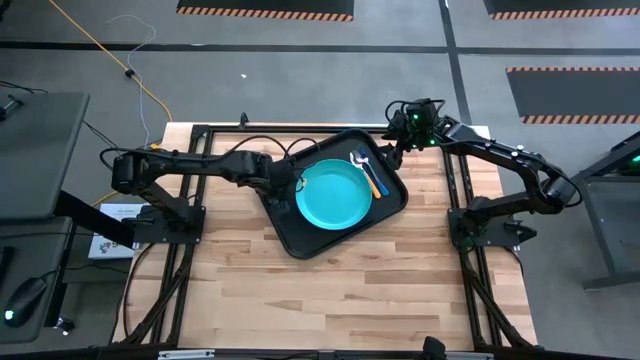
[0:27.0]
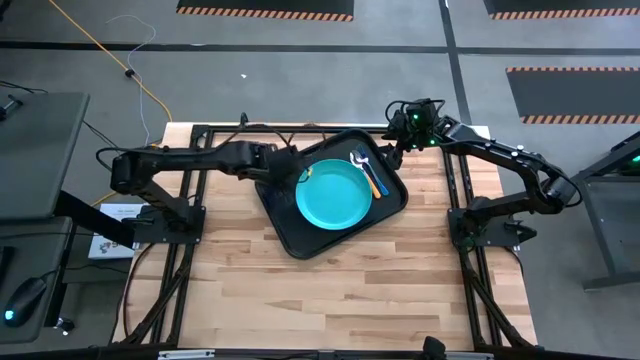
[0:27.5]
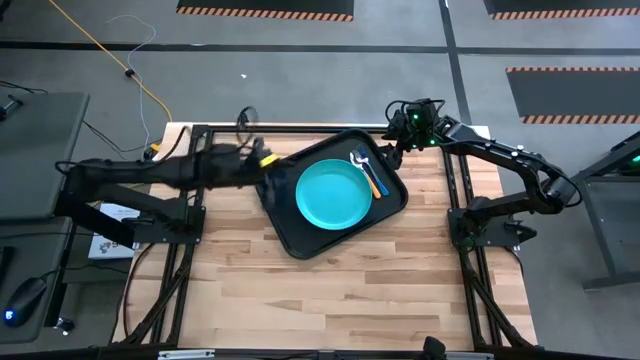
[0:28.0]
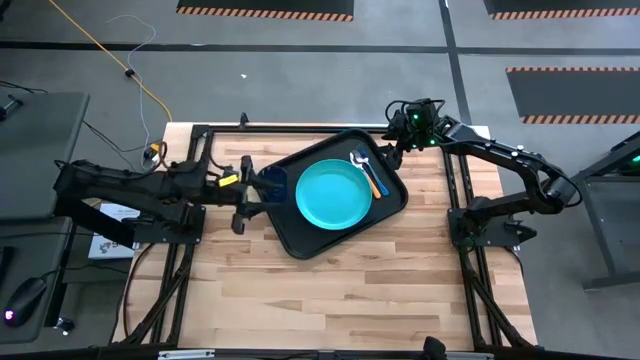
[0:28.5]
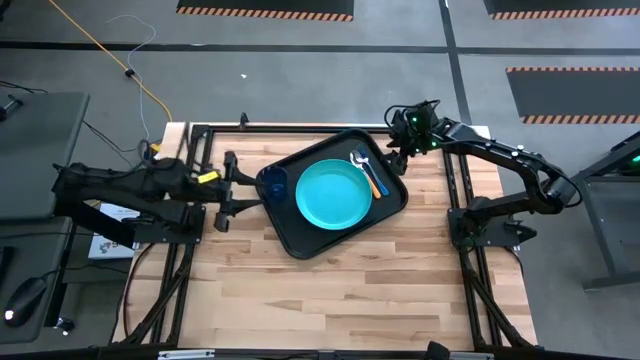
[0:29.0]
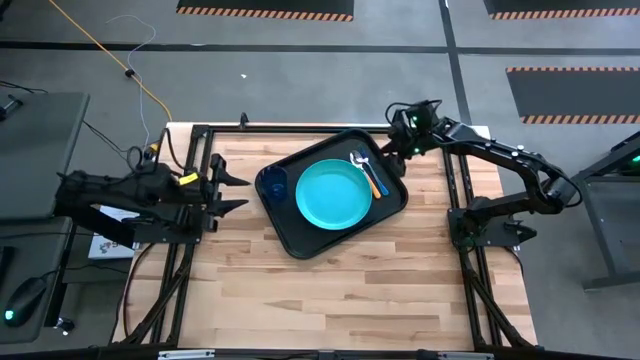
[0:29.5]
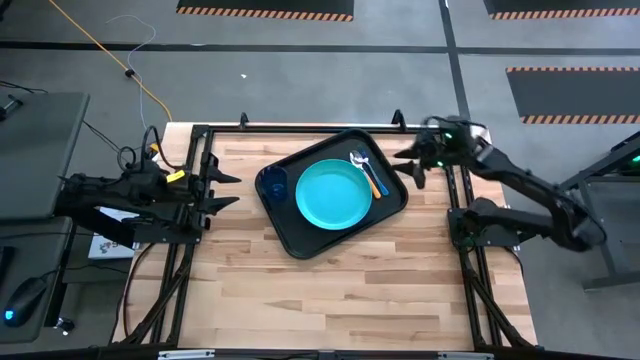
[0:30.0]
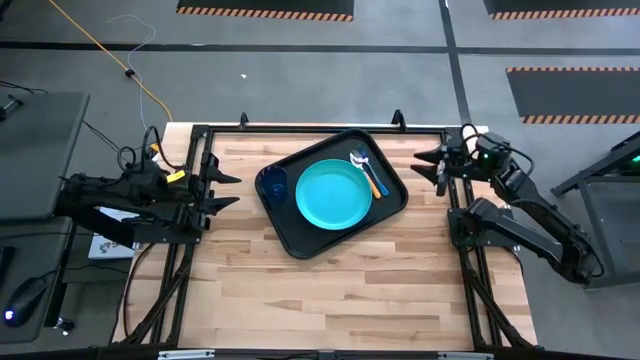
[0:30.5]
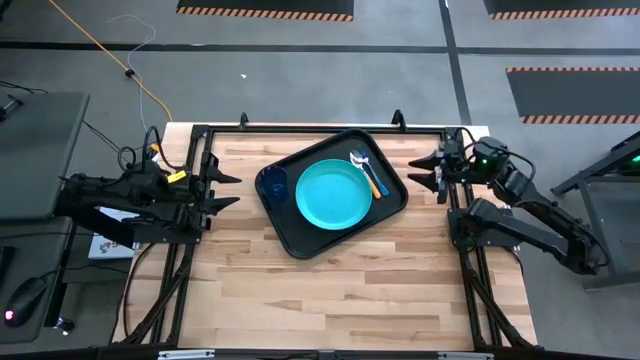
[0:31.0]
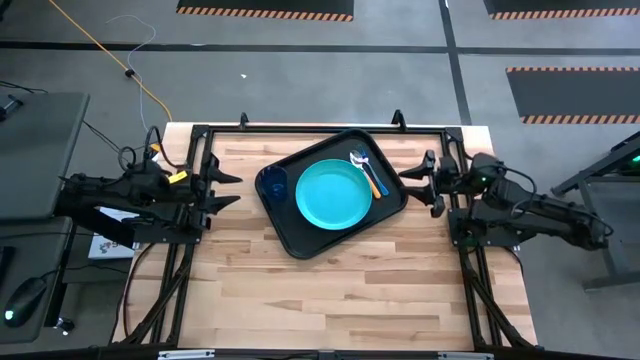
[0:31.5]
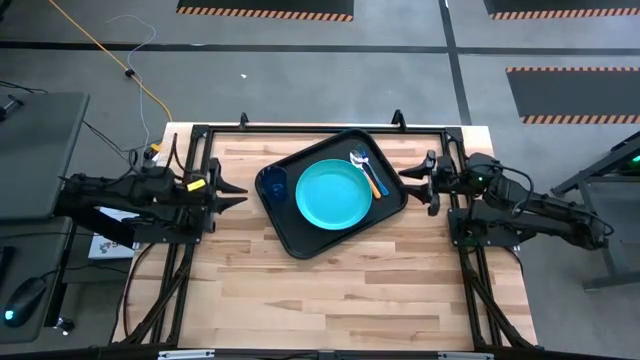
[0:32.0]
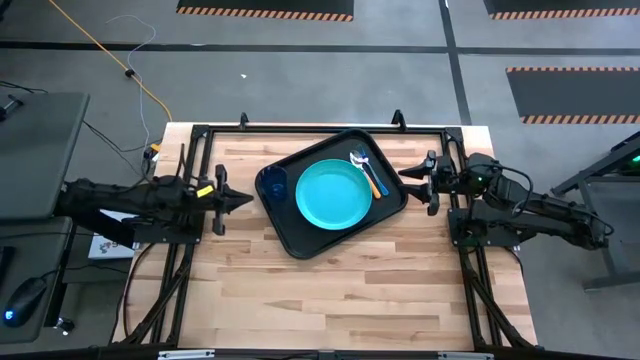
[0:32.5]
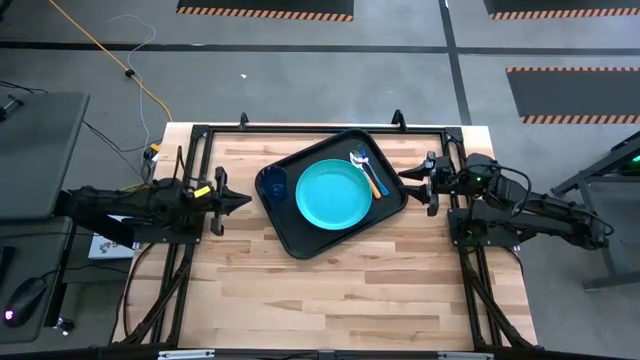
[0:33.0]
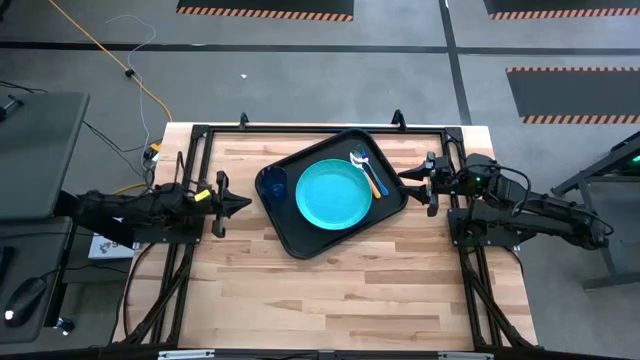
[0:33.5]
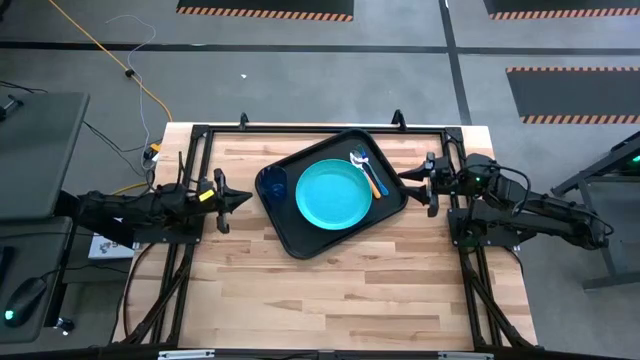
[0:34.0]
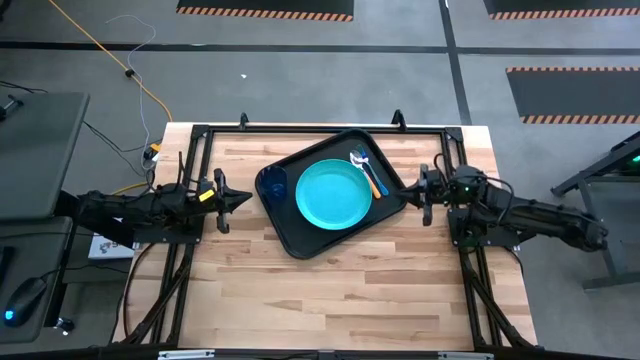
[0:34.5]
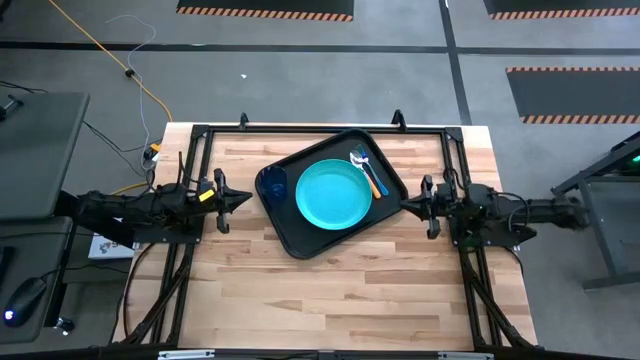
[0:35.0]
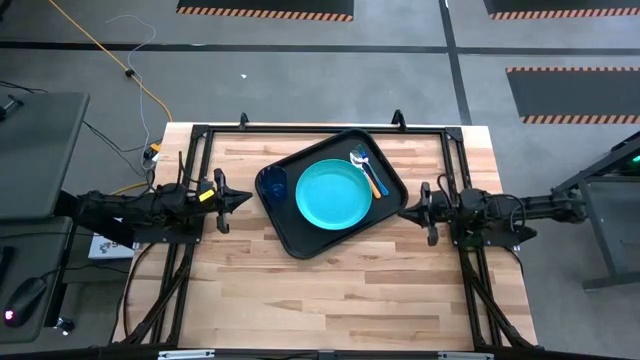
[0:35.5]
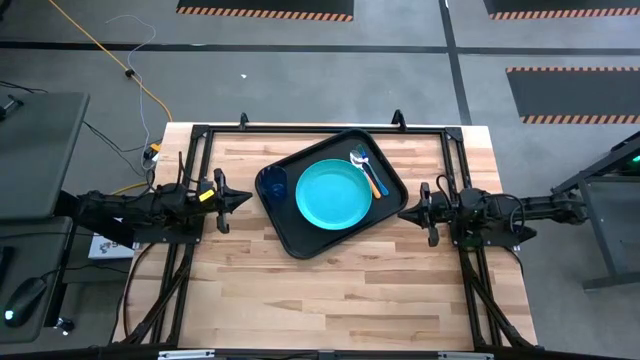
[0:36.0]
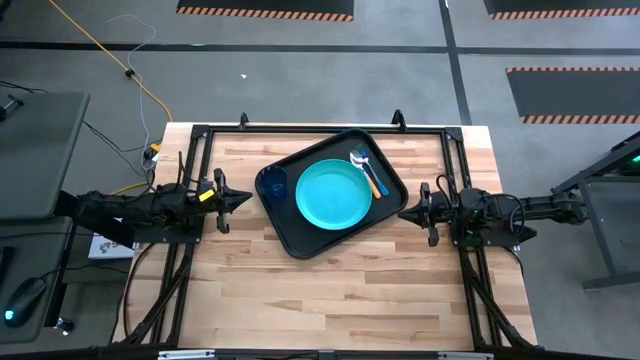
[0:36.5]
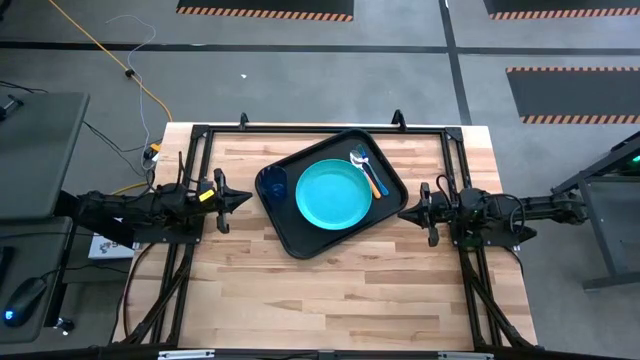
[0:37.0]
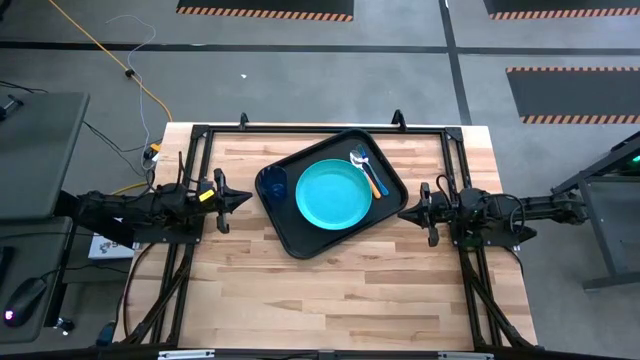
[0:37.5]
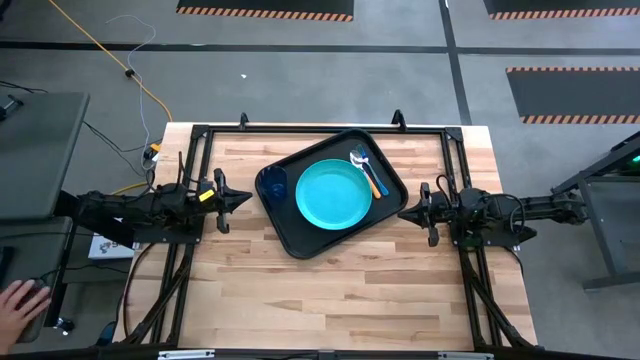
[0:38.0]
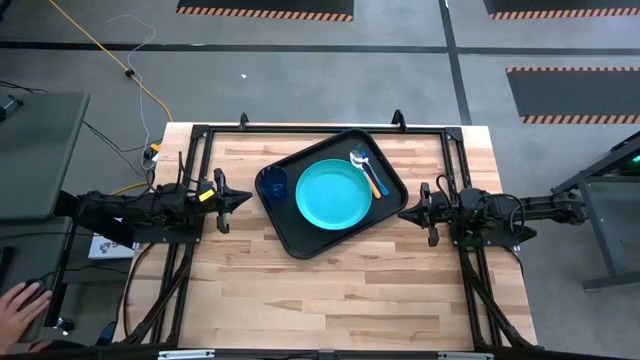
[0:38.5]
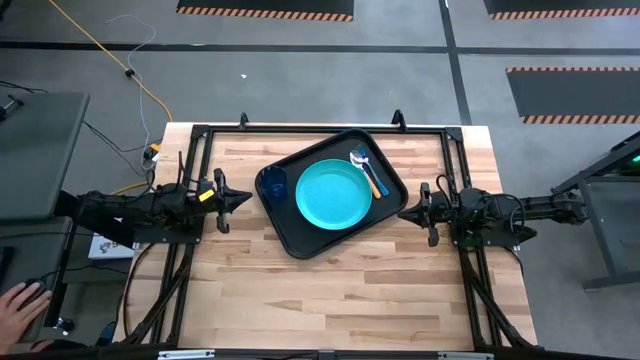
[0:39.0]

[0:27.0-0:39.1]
Task: Pick and place plate/cup/fork/spoon on tray
Return to Home Position

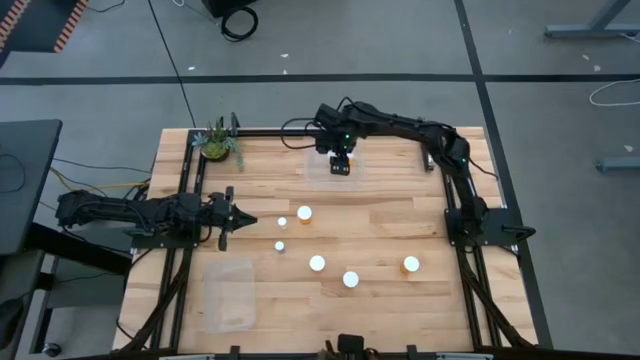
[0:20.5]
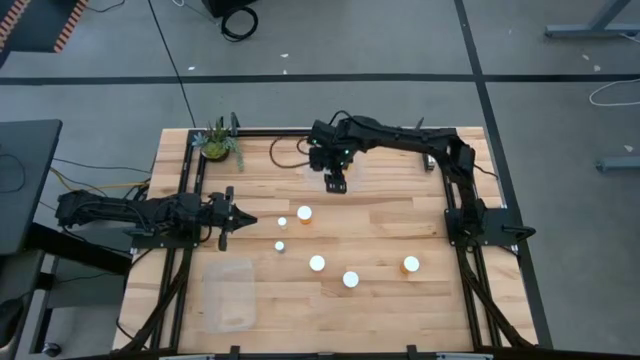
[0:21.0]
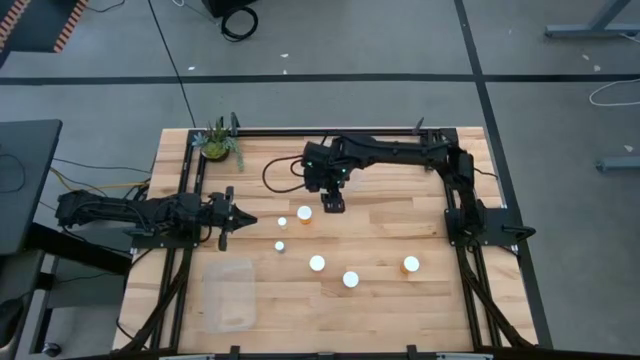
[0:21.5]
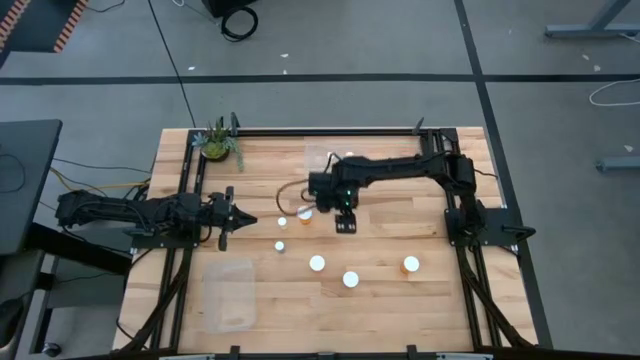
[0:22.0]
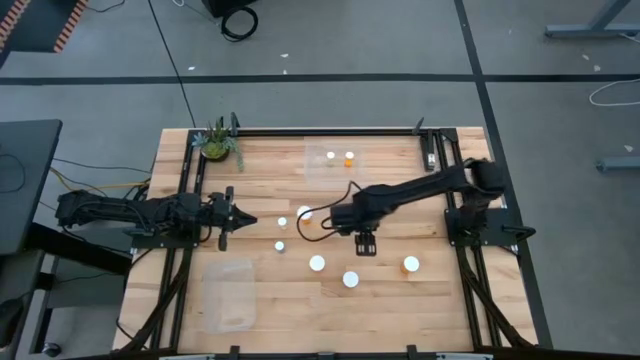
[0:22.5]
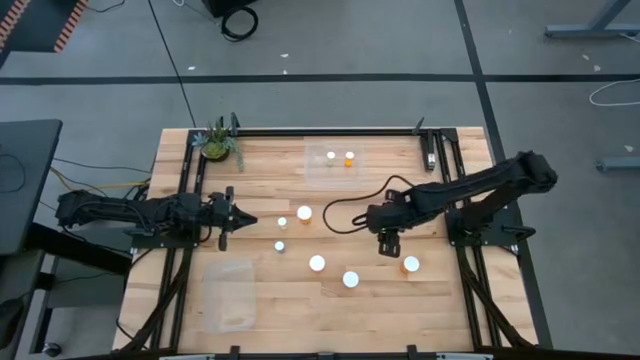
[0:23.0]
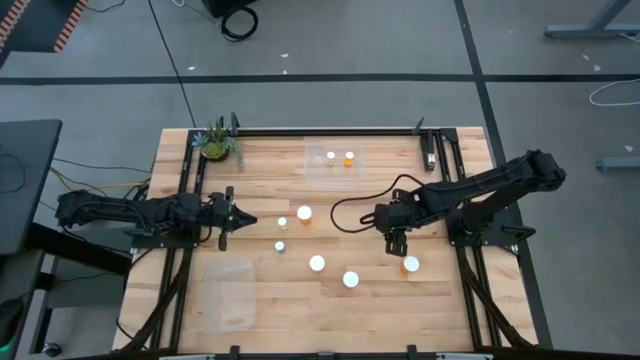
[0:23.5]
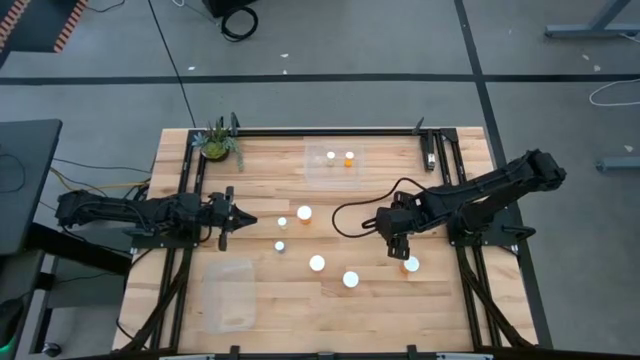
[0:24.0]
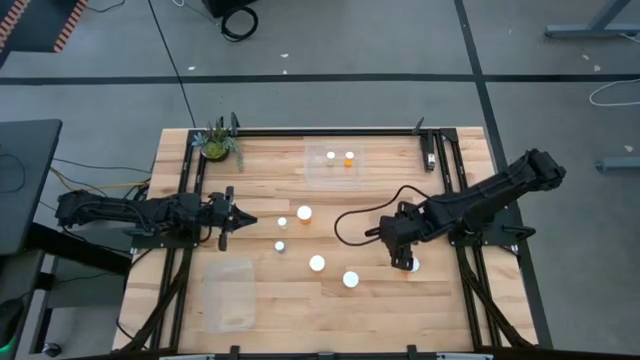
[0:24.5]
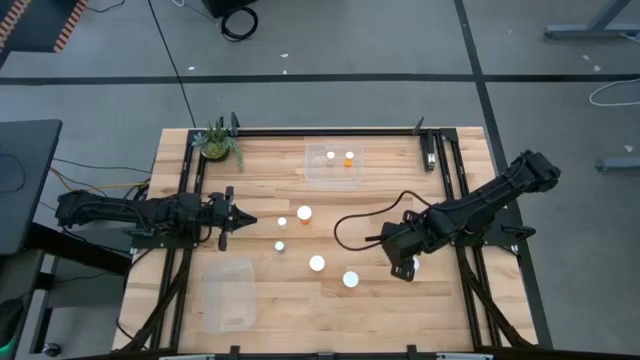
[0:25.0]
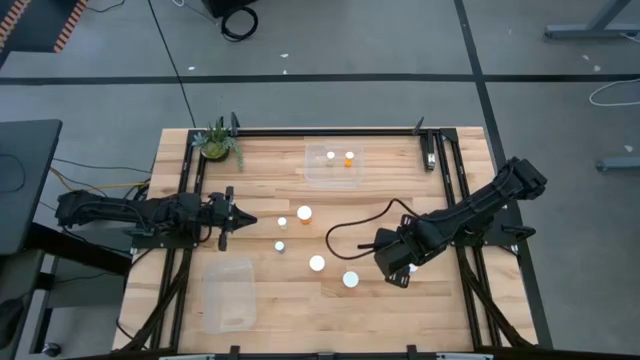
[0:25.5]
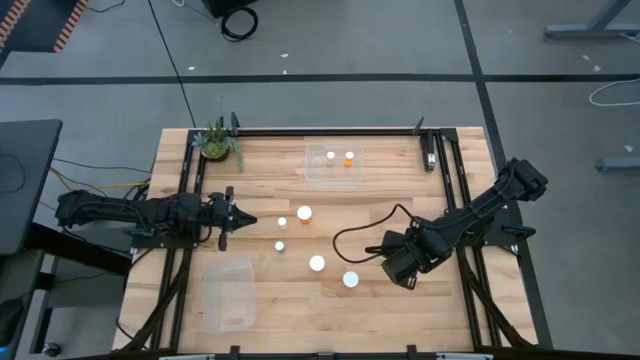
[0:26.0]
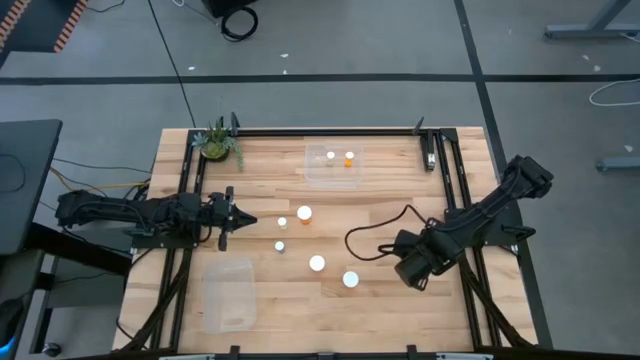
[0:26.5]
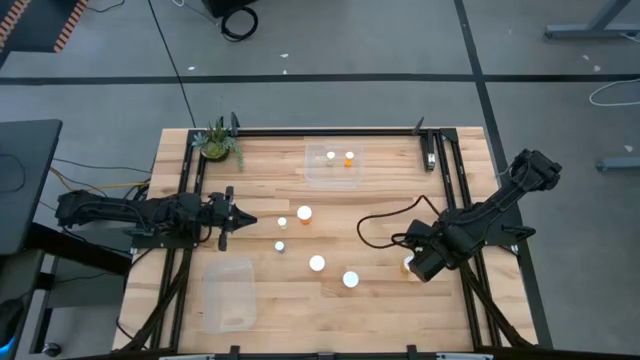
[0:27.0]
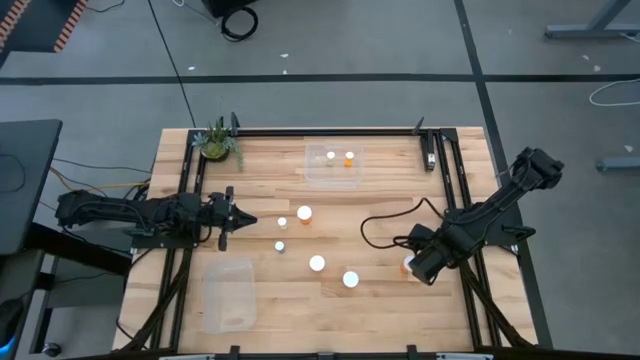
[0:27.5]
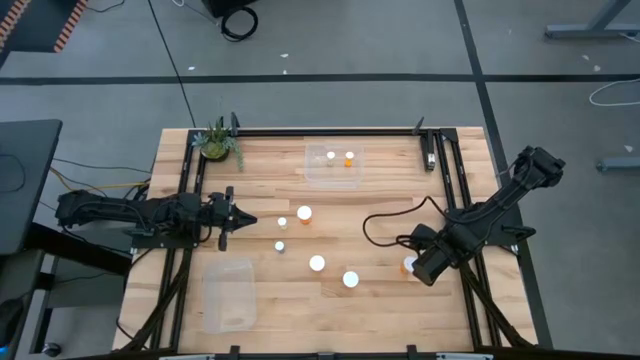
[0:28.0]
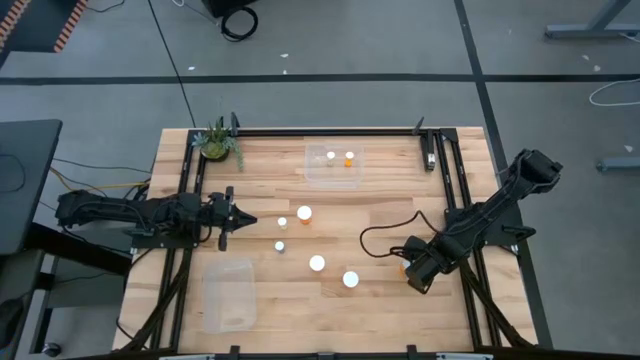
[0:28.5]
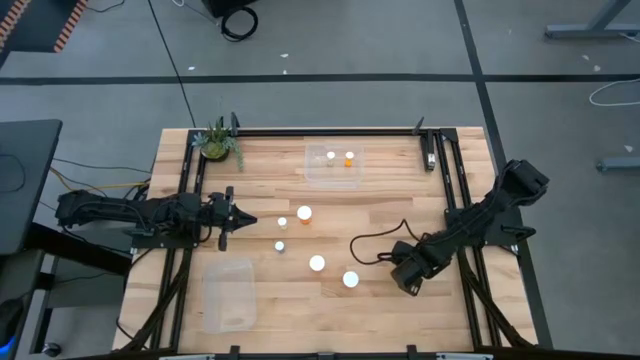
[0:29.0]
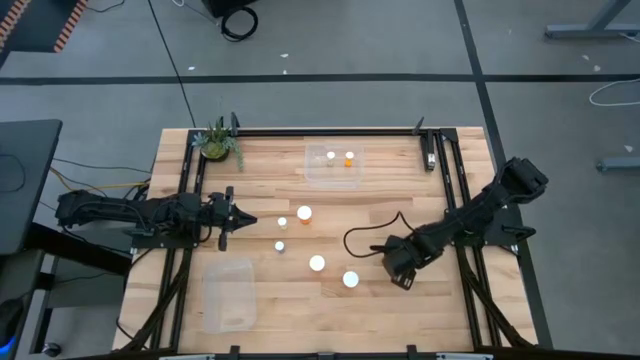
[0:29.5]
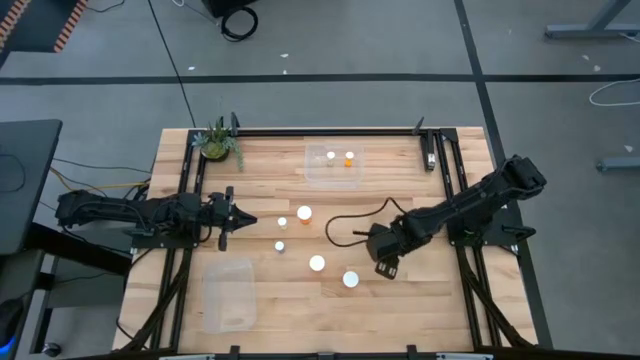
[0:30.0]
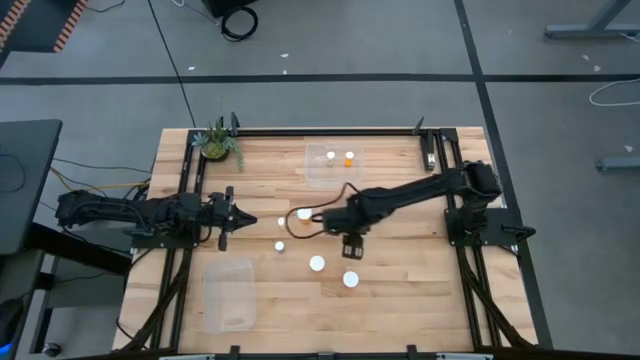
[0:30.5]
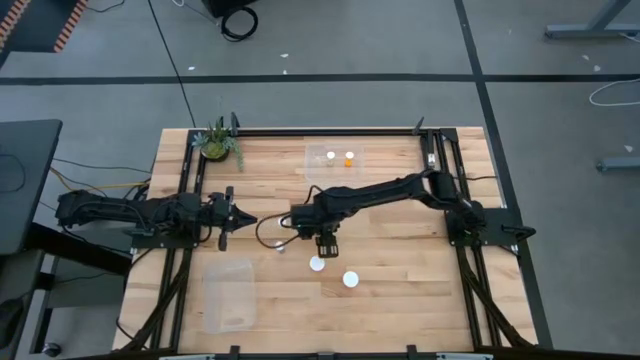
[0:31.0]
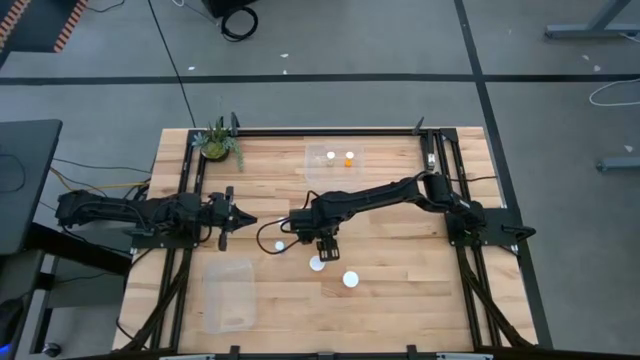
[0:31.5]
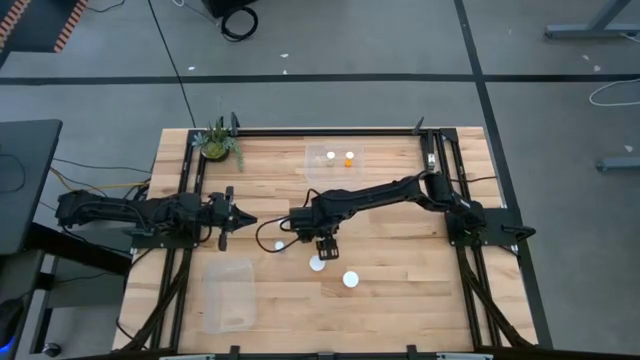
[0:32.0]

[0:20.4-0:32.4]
Task: Pick and place medicine bottles into bin by pill shape (circle, oval)
Move the orange capsule bottle to the center of the table
